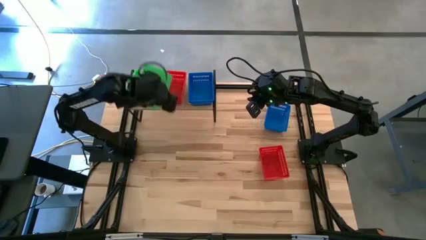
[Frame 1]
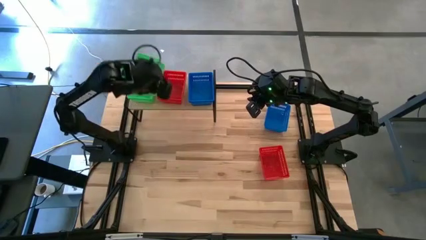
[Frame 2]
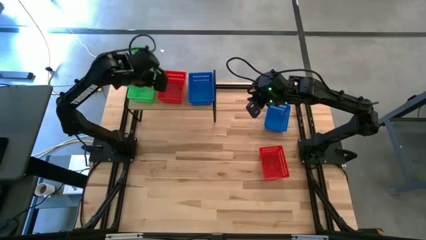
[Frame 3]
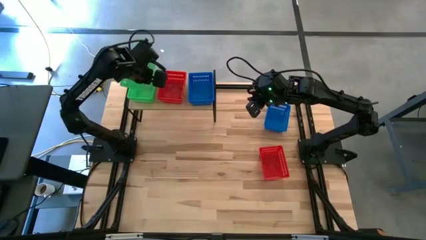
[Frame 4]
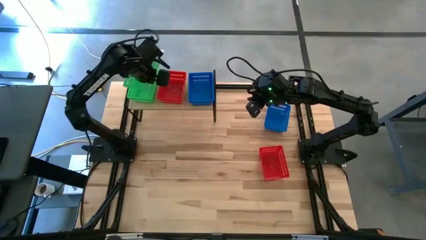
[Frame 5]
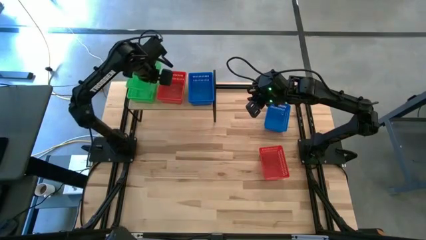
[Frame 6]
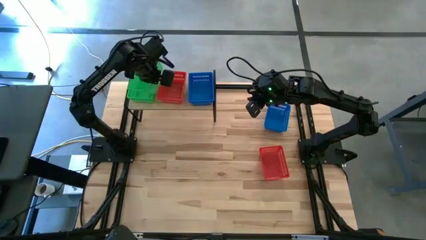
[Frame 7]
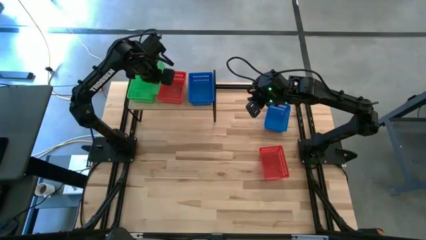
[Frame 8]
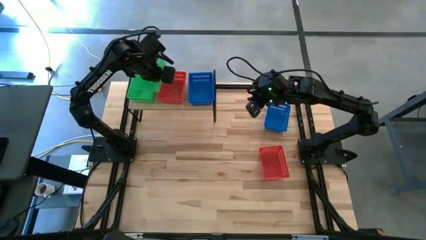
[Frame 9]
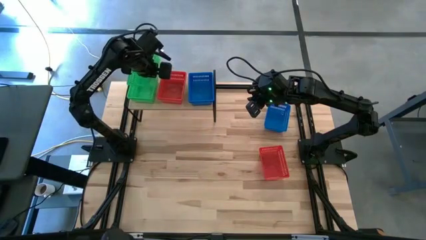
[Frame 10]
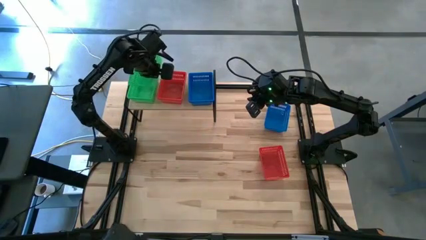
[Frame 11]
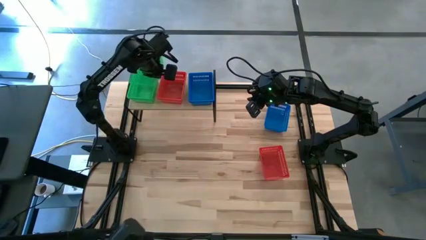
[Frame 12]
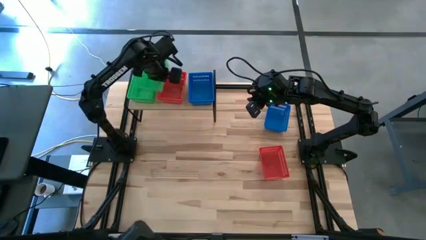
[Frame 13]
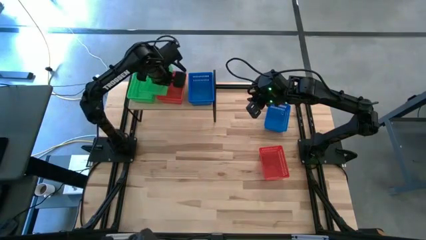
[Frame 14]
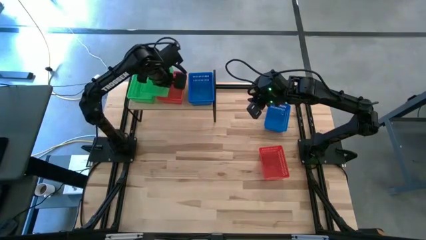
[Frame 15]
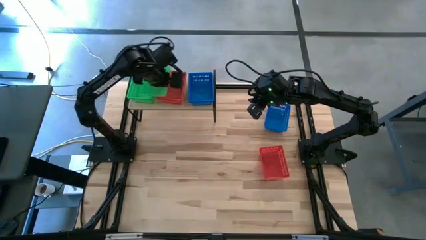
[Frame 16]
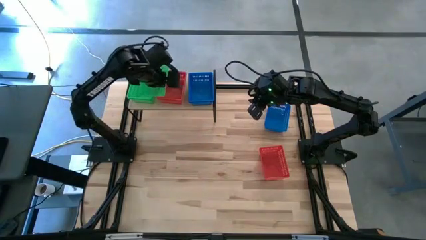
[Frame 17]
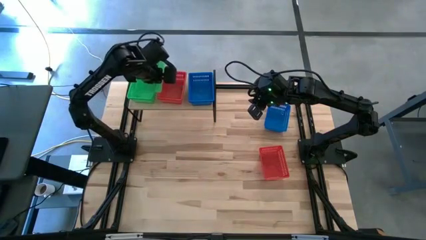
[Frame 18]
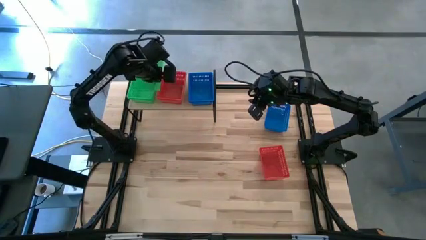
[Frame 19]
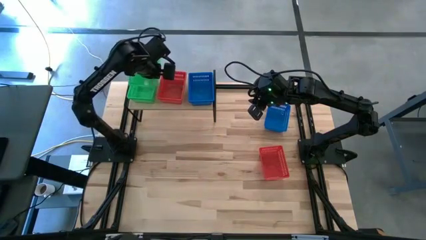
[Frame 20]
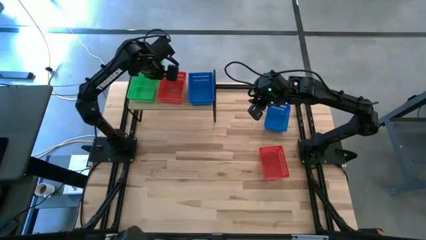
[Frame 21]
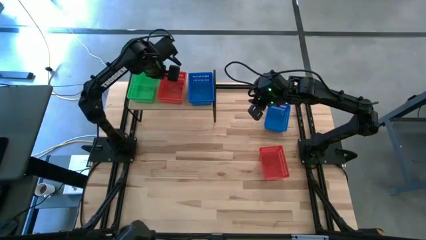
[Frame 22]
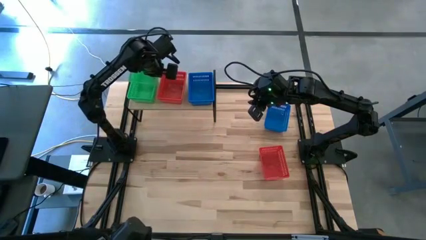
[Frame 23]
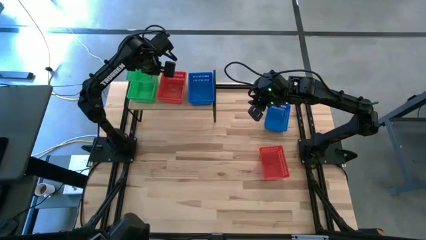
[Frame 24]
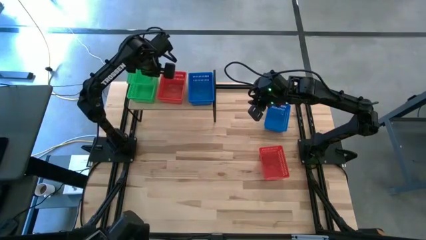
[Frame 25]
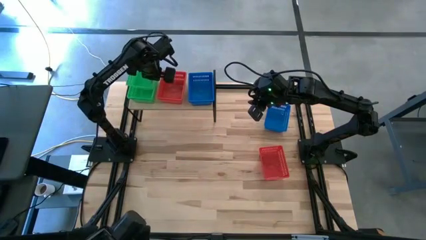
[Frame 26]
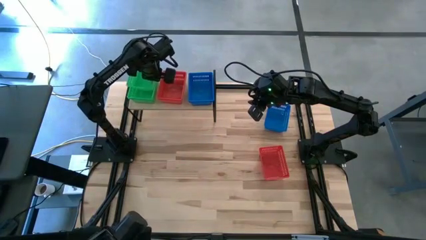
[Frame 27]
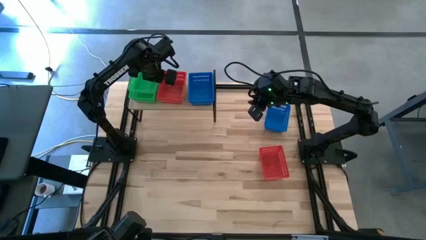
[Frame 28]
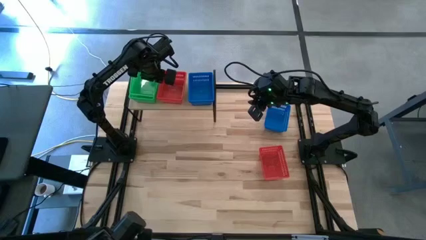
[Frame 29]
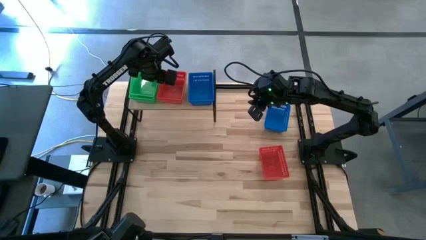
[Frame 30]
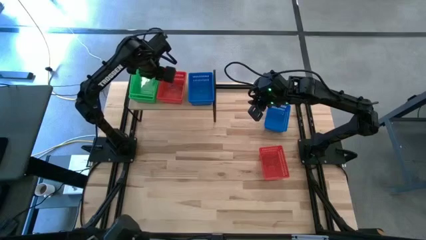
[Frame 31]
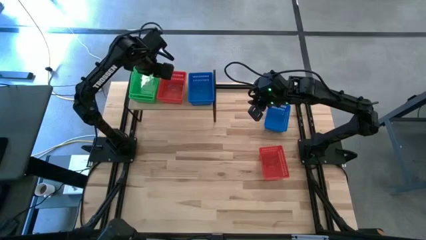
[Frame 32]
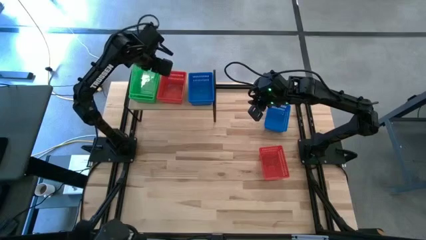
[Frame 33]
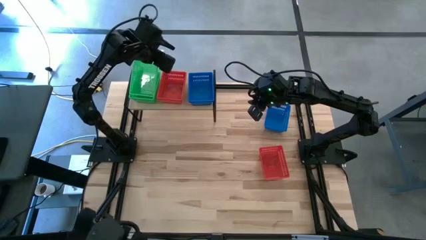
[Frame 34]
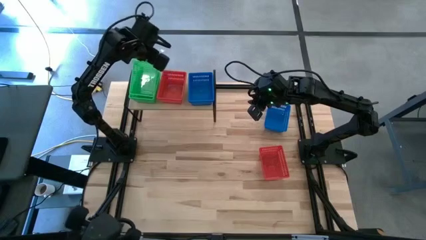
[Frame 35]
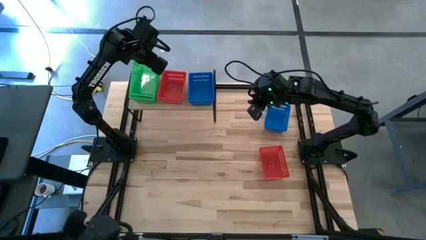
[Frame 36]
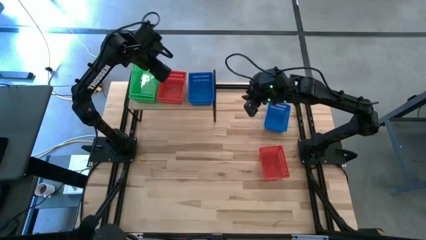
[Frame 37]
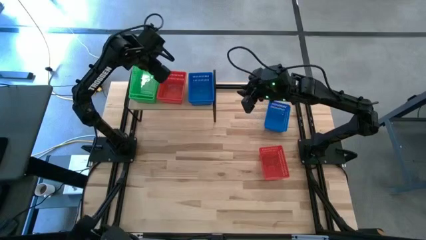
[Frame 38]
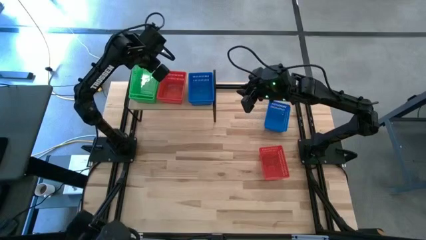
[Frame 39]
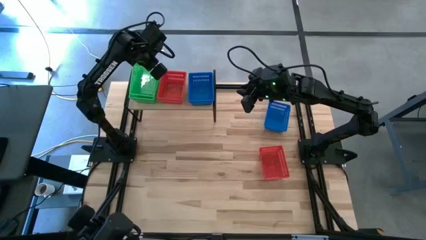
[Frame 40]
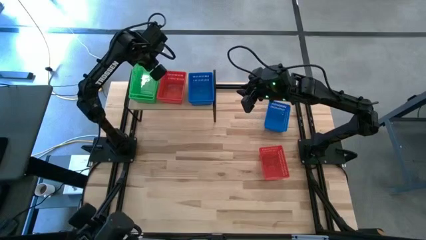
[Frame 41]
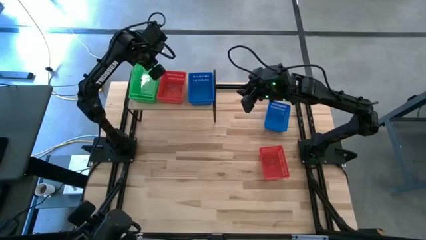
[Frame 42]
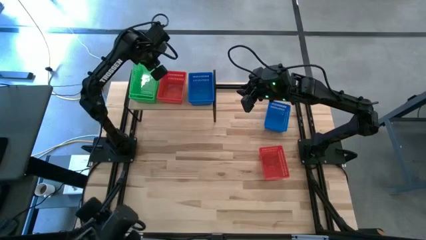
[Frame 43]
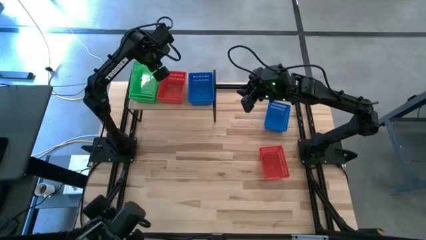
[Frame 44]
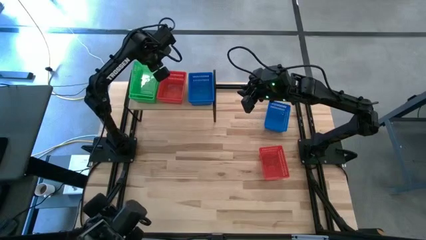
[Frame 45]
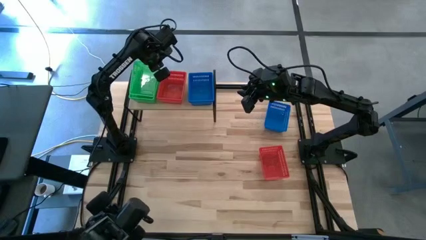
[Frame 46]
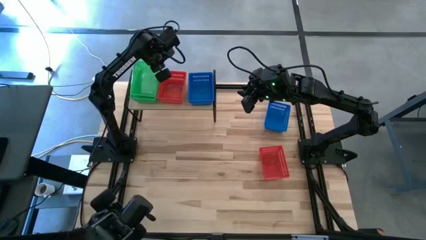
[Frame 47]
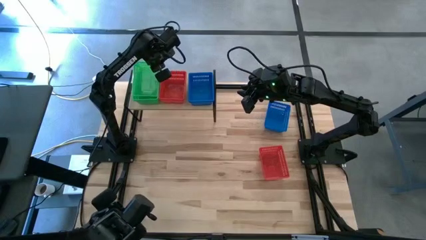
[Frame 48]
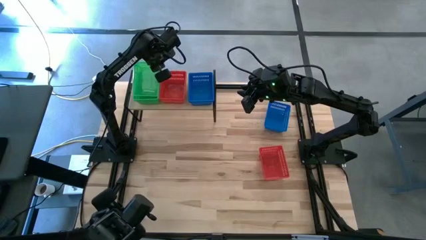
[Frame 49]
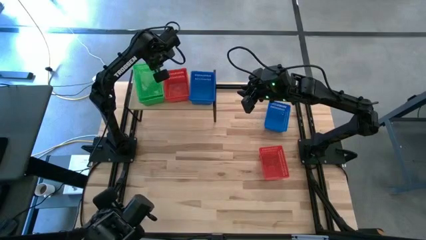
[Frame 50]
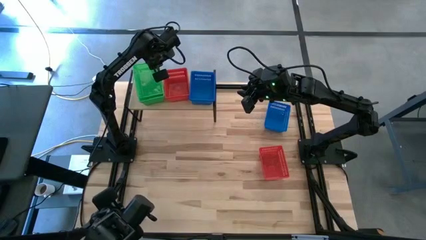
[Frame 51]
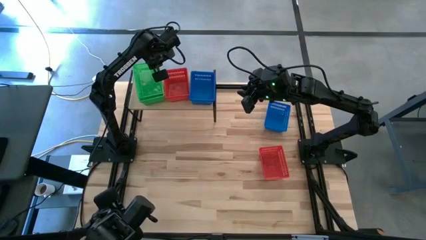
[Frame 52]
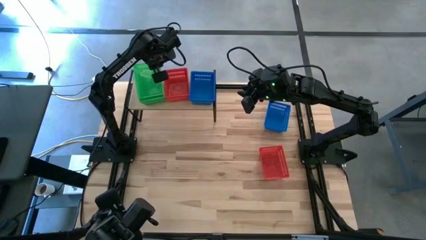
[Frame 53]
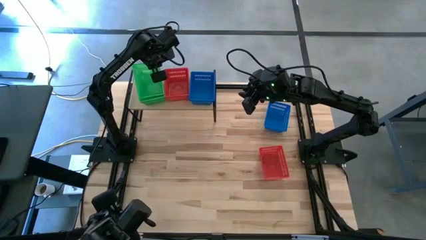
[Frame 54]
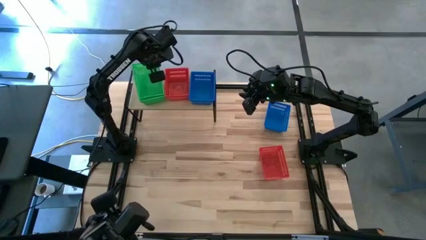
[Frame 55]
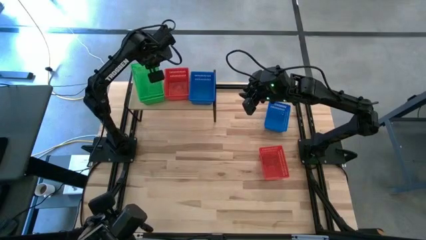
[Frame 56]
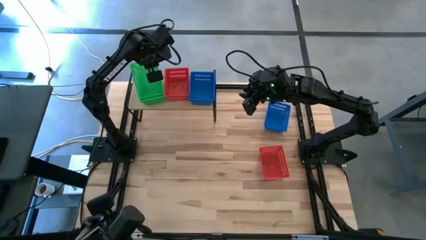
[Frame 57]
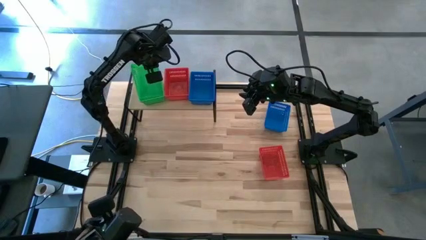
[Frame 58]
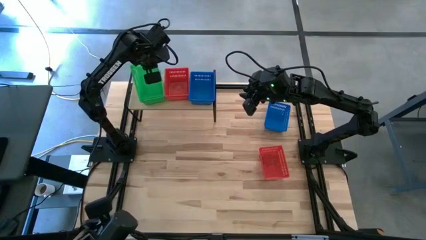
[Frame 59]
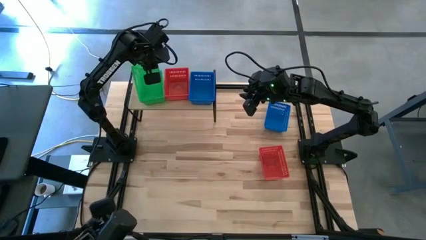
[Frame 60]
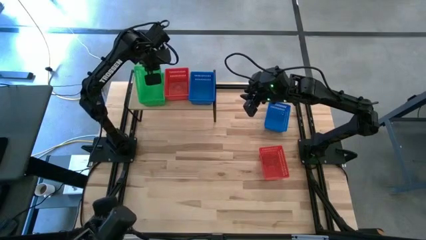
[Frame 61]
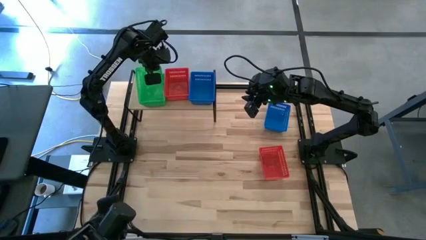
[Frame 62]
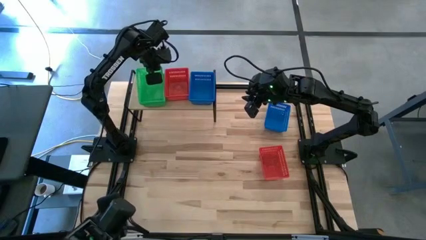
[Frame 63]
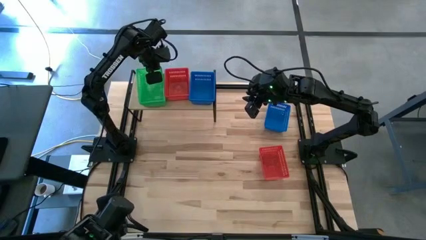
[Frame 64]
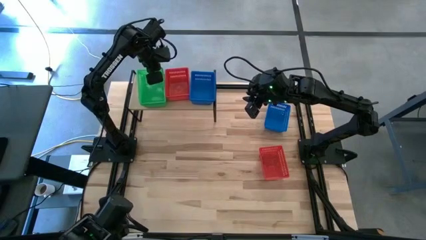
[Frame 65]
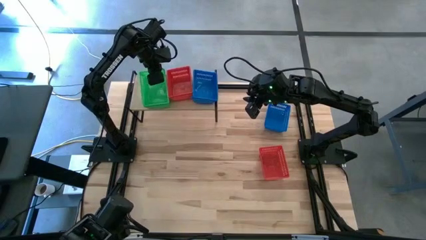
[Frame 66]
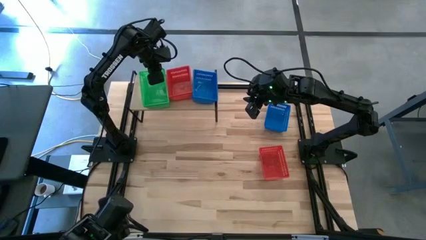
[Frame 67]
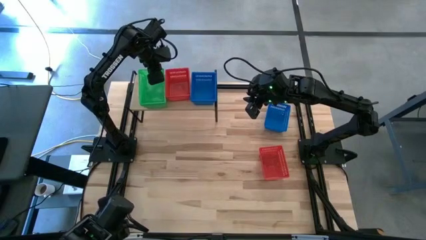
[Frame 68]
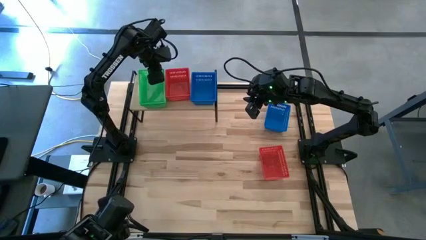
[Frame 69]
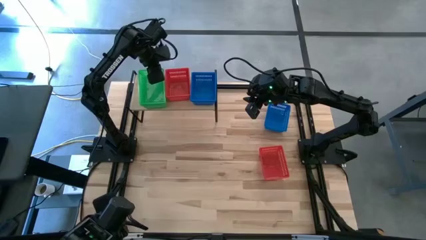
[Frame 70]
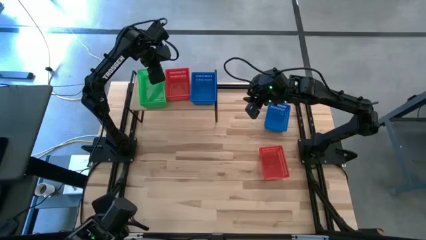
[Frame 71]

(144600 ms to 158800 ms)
Task: Stack baskets on shelf by color
Stack the green basket on top of the red baskets on the shelf
